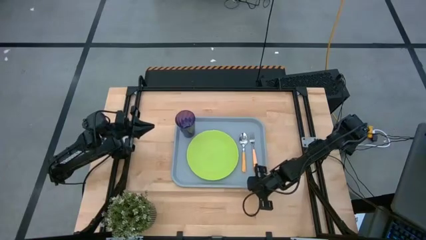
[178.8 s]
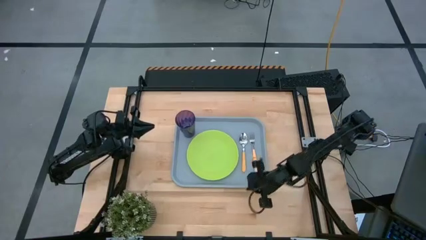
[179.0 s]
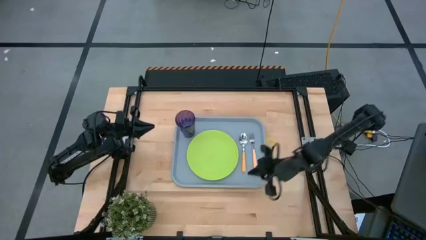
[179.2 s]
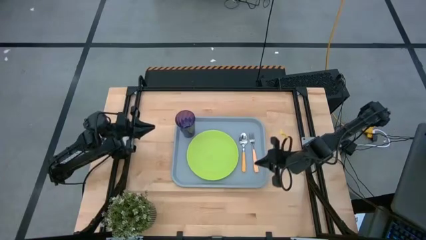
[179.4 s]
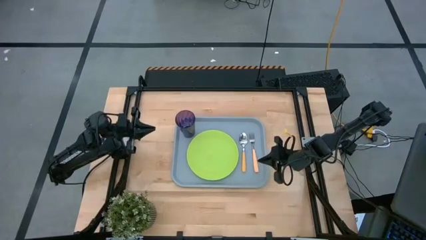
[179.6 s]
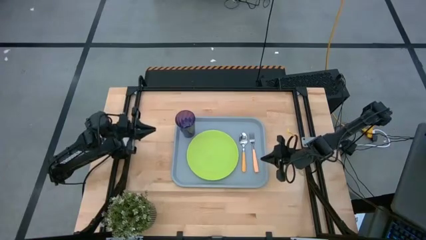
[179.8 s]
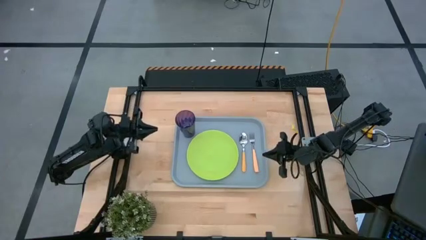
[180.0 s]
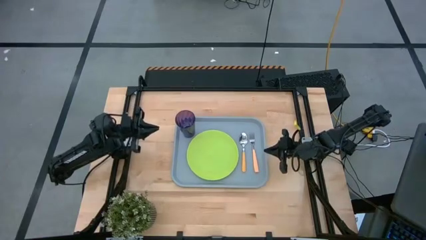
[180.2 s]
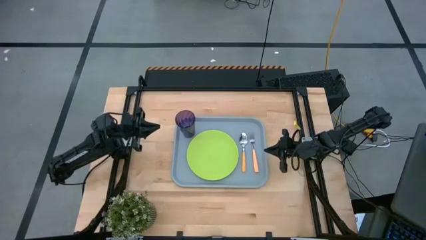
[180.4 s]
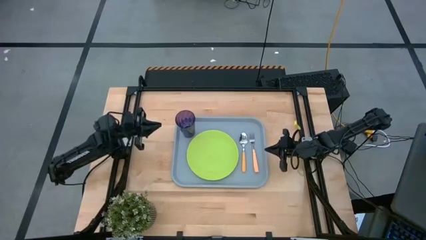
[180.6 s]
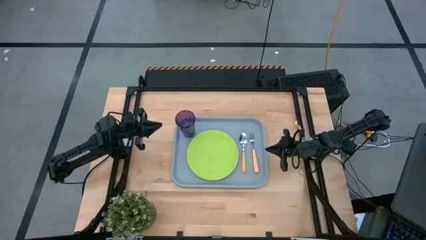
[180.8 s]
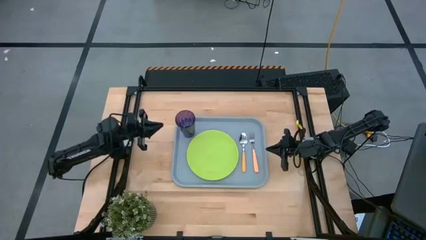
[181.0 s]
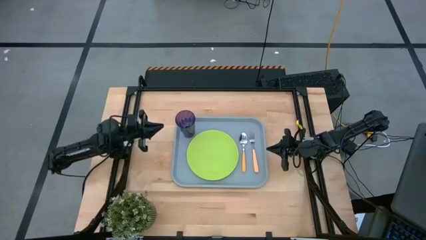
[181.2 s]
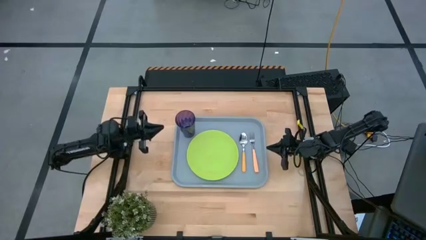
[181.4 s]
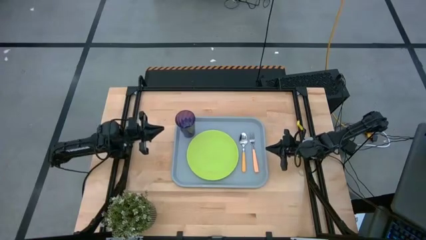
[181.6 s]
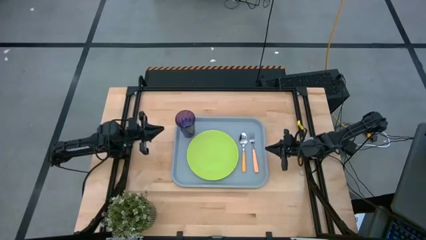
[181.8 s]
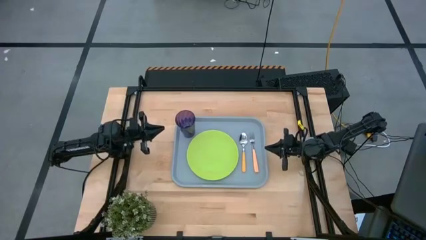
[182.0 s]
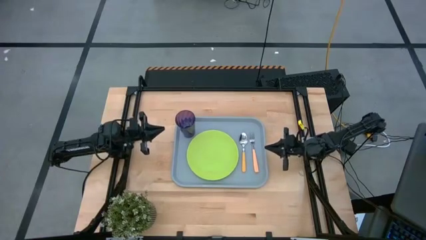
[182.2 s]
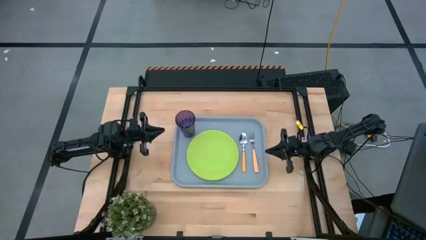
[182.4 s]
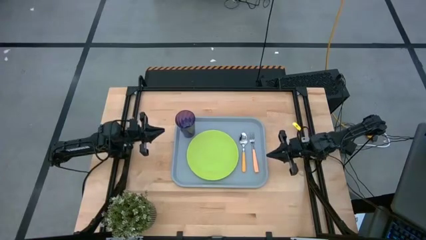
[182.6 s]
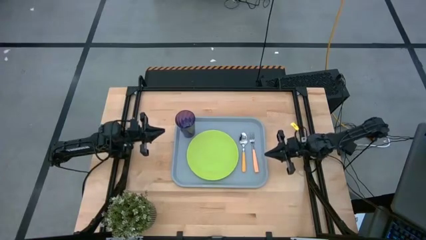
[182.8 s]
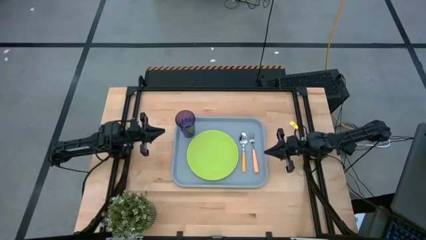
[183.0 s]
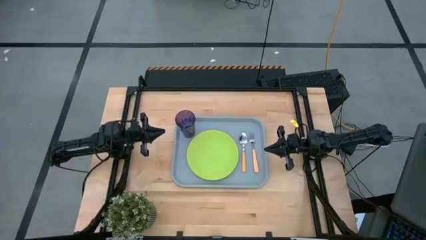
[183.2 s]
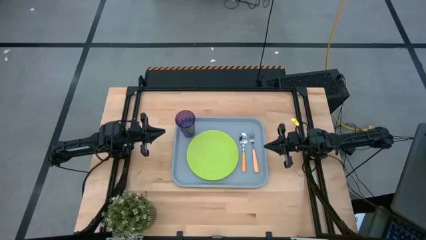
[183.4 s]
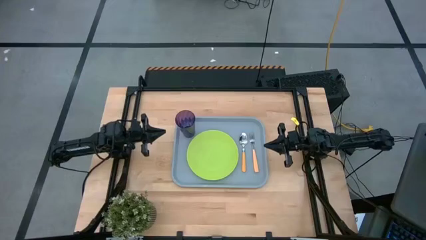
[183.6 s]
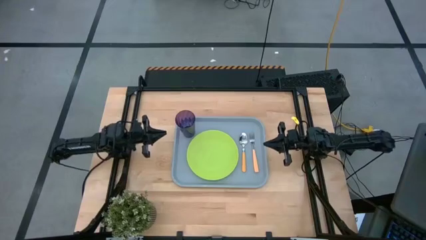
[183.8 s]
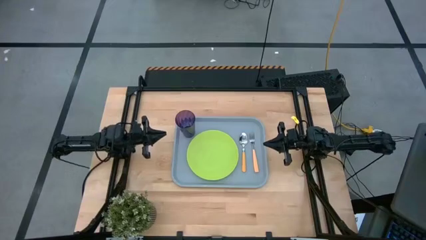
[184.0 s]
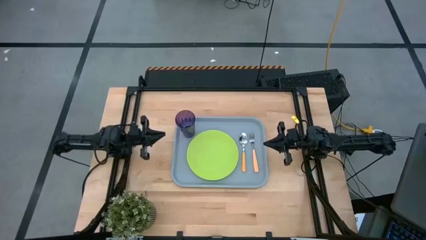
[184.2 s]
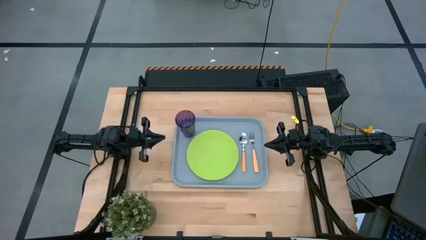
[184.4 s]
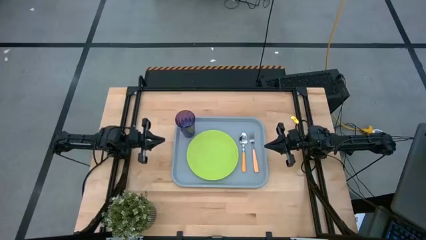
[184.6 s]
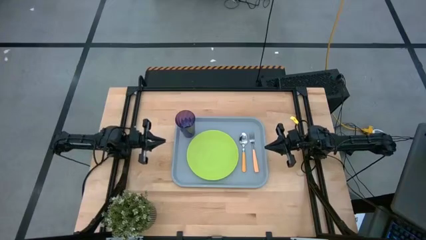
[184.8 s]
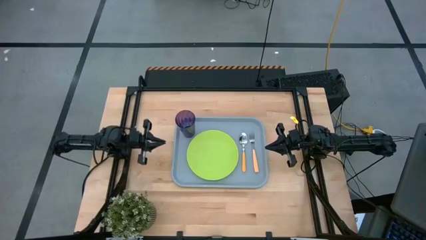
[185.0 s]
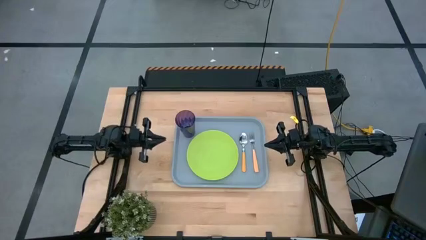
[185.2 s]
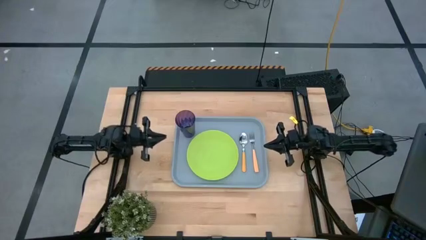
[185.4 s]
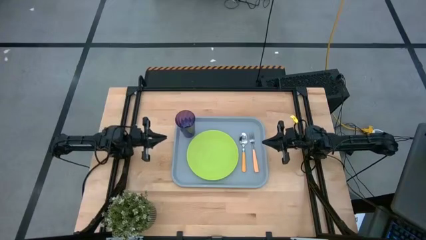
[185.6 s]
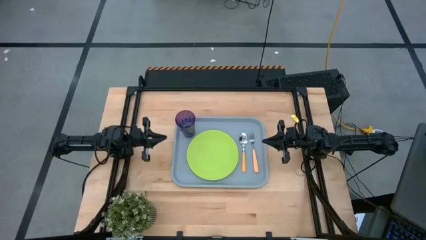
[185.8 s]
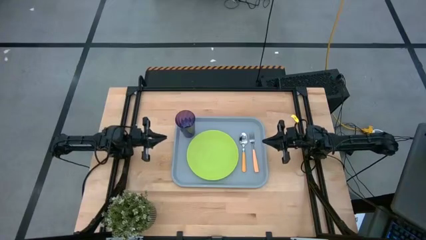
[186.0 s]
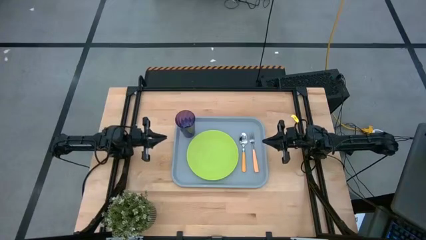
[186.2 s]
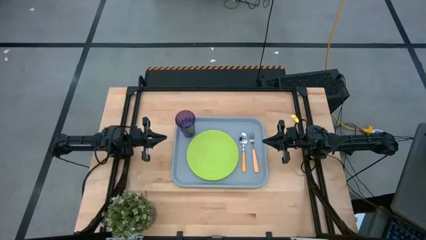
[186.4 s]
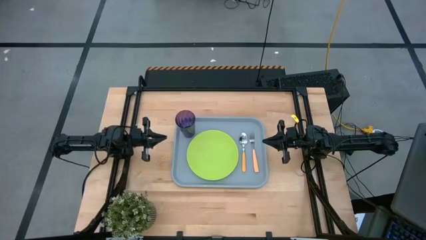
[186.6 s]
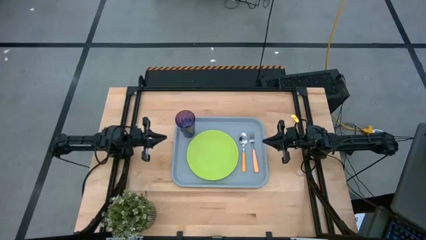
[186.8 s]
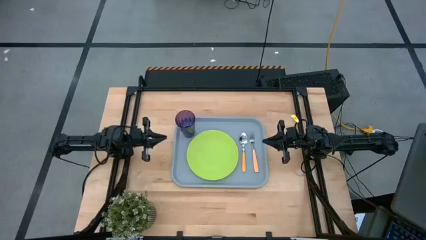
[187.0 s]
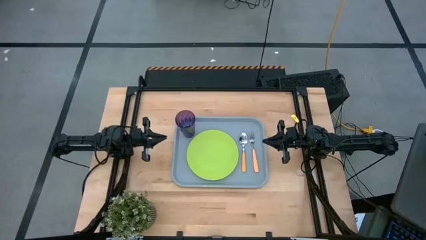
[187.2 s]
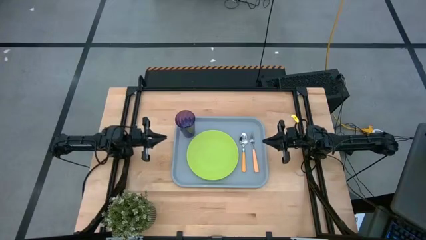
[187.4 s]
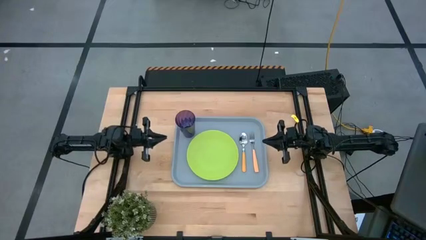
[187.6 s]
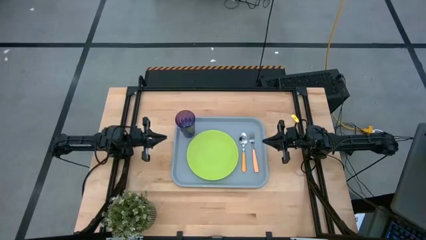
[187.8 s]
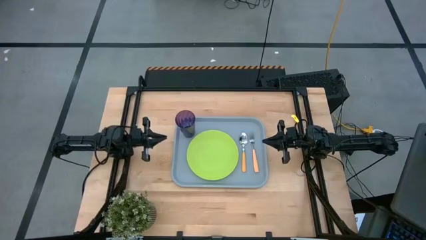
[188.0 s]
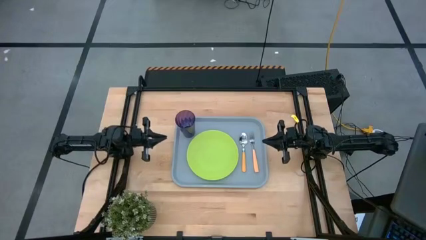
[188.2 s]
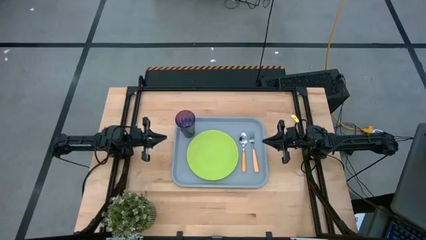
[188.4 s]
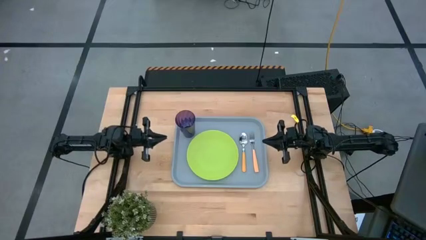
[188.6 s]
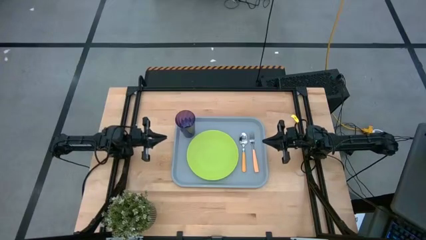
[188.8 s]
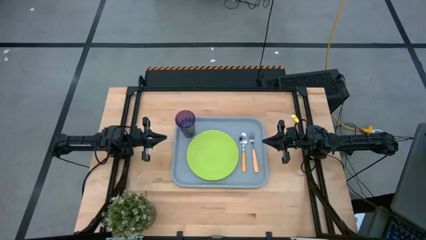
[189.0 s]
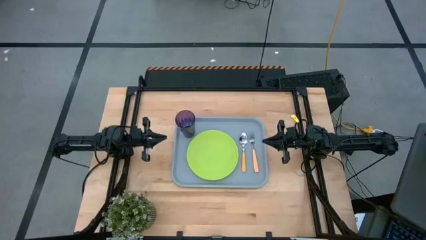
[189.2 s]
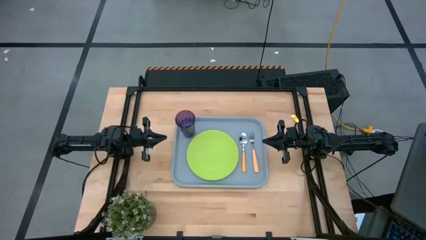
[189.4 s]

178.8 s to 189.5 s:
Task: Pick and place plate/cup/fork/spoon on tray
Return to home position

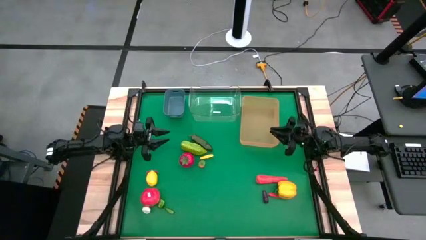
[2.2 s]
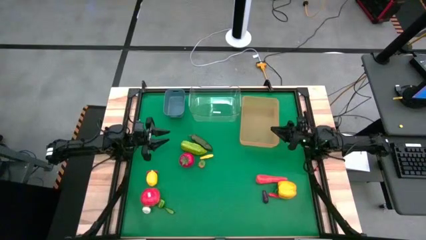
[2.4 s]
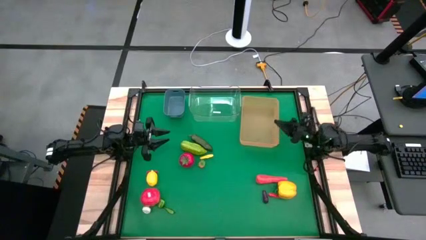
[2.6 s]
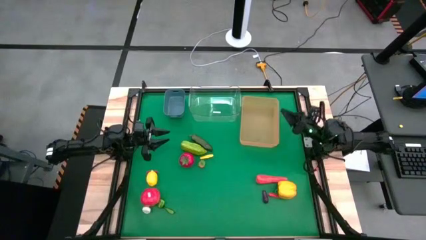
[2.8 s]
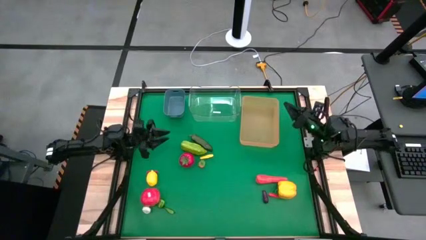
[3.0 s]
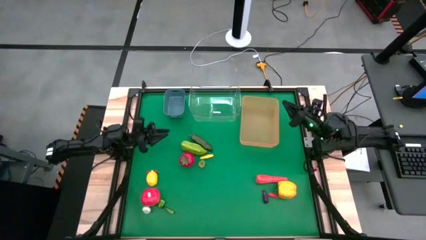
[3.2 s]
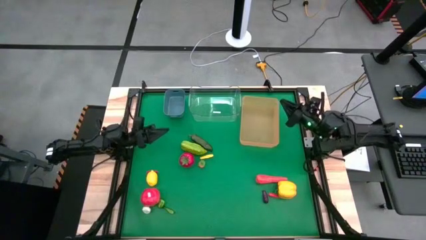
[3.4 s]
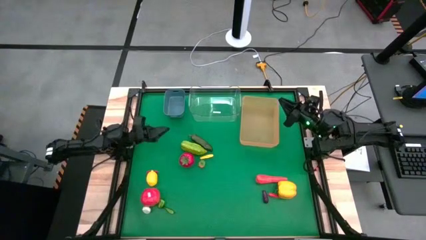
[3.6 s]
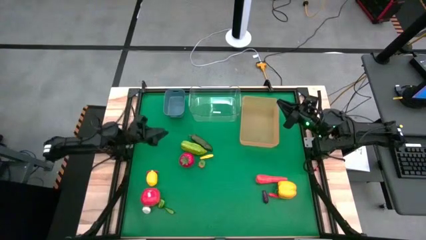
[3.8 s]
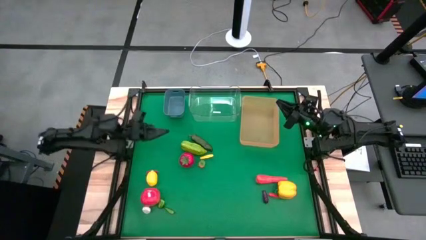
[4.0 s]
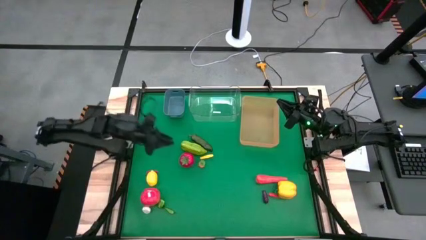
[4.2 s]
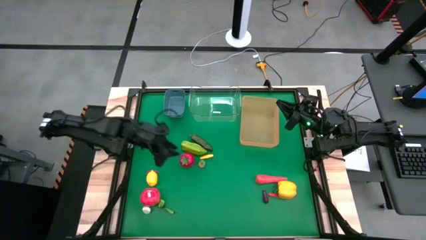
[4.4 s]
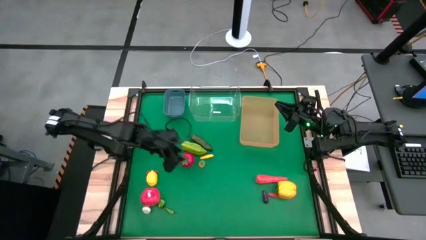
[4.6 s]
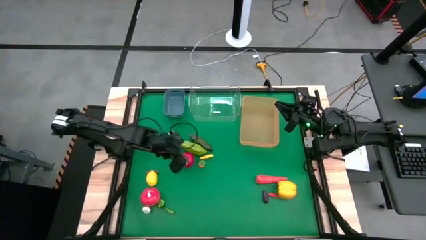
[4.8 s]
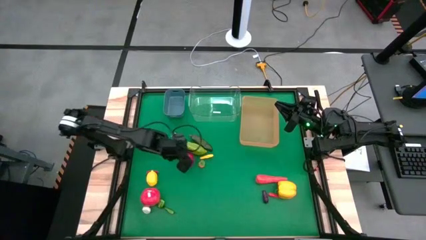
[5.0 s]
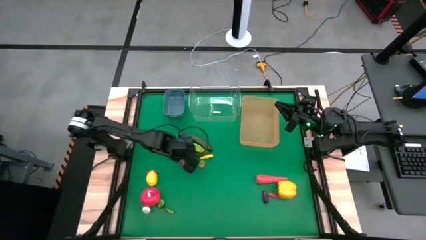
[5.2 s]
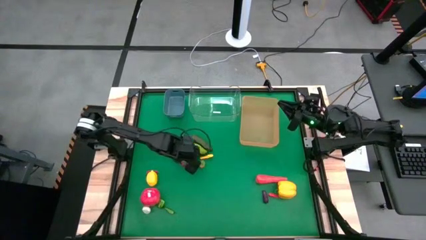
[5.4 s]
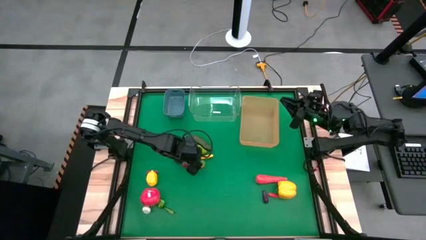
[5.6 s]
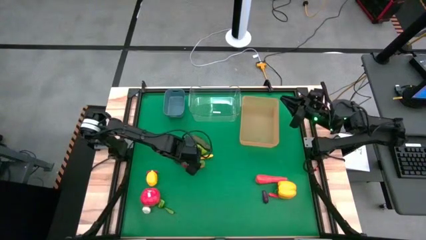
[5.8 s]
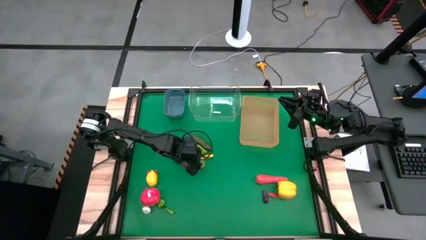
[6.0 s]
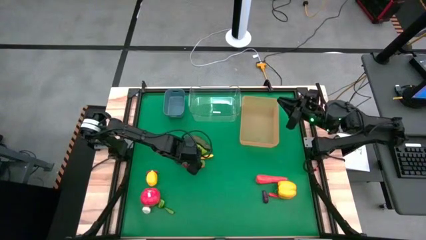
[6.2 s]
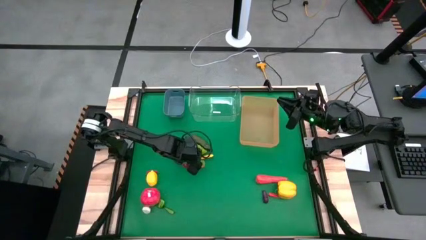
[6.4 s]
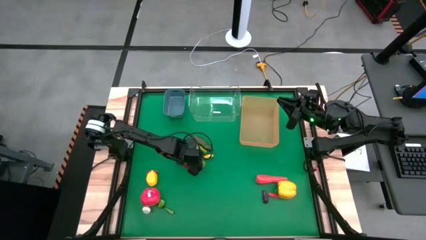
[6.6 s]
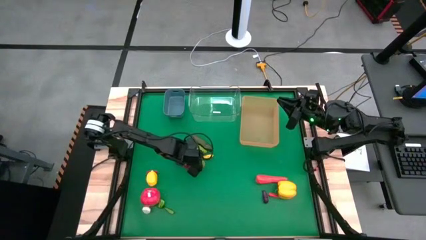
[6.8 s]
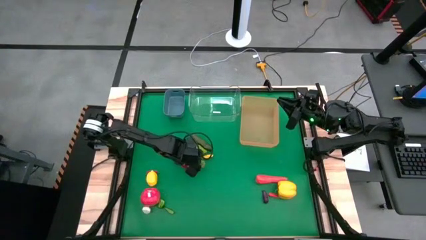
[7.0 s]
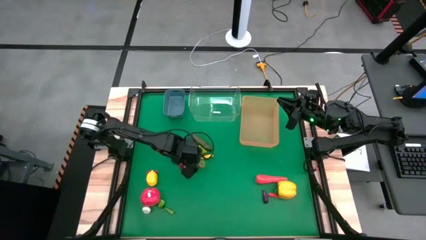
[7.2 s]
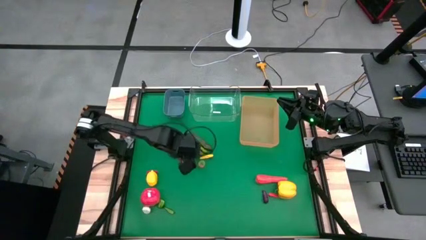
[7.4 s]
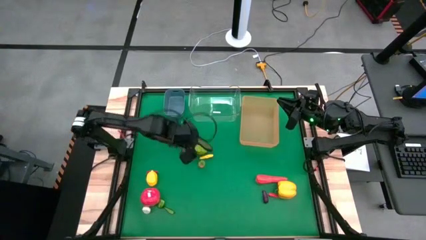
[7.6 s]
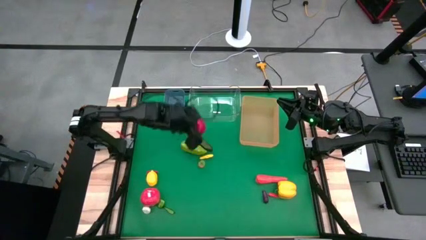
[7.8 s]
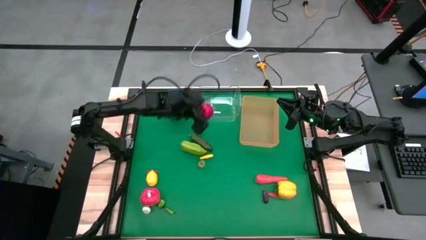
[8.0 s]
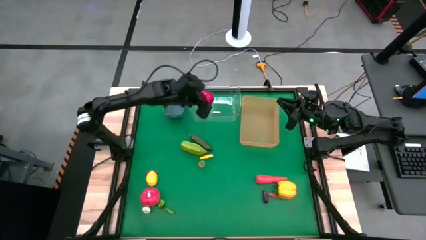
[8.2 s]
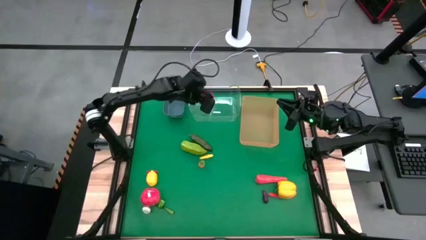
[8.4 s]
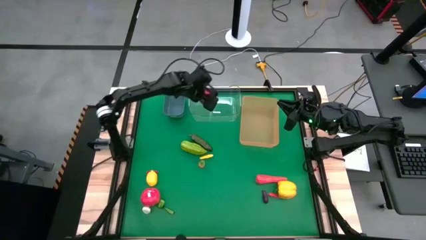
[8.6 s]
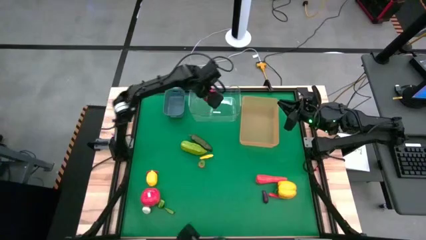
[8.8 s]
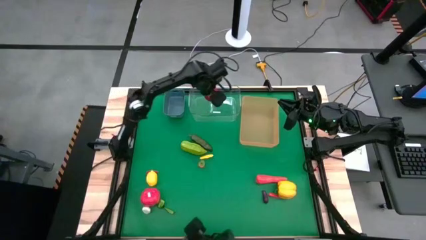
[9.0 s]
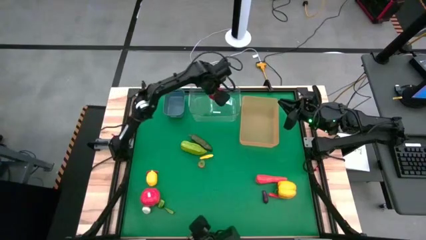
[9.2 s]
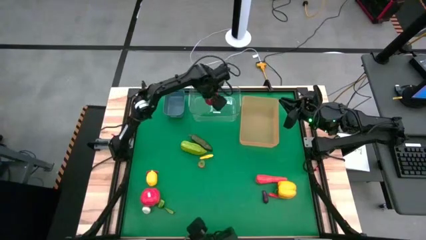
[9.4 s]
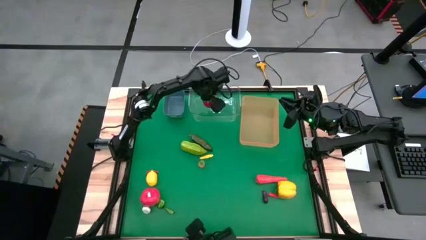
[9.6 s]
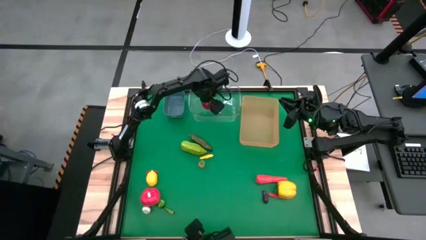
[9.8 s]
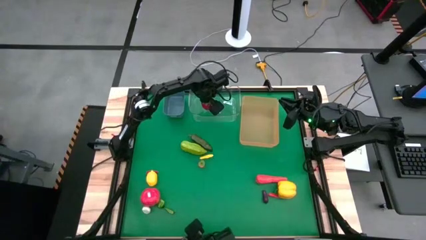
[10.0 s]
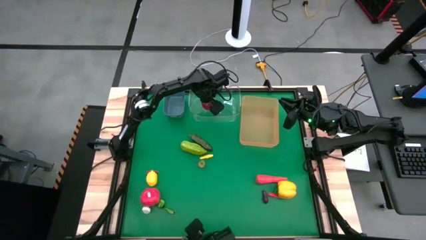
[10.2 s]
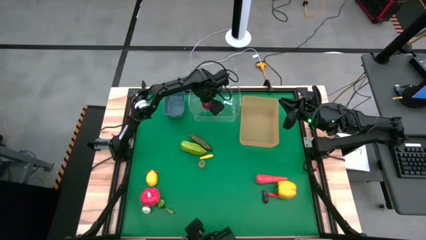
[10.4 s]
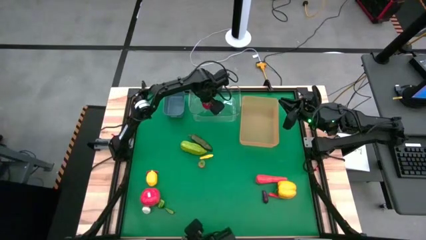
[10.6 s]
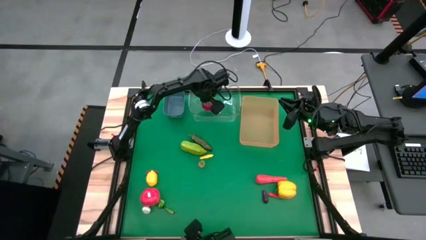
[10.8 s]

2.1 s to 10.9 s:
Task: Sort produce into baskets
Put the red tomato into the transparent bin
